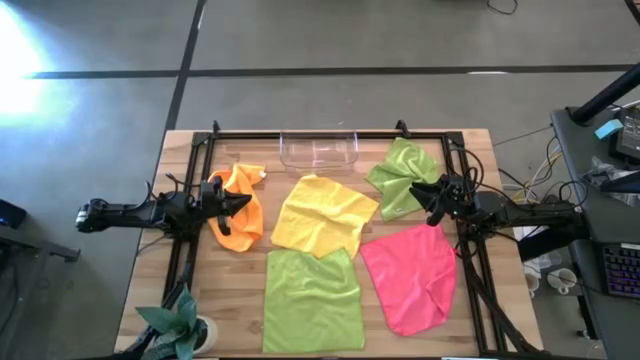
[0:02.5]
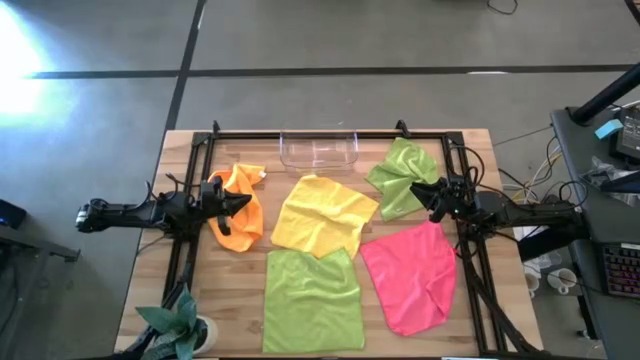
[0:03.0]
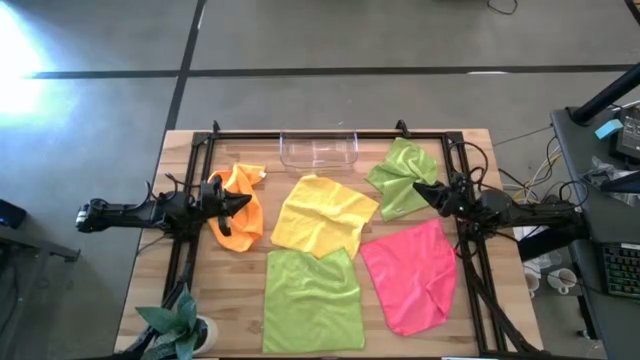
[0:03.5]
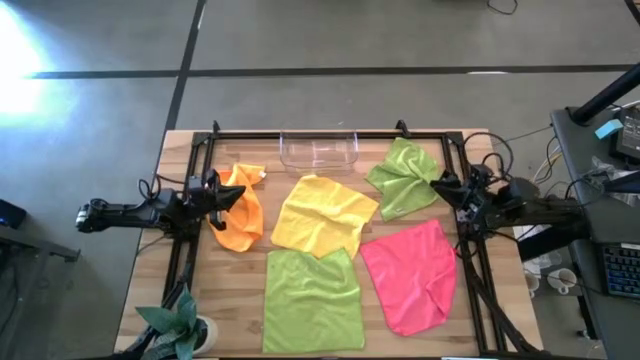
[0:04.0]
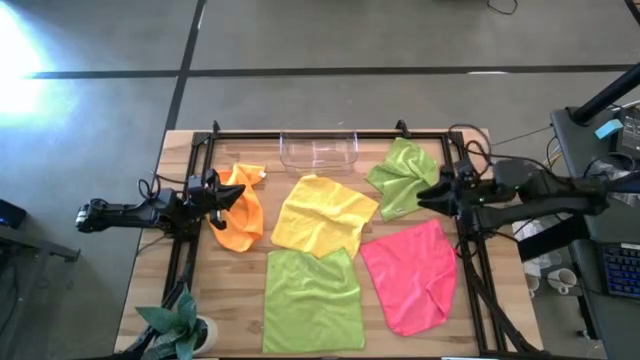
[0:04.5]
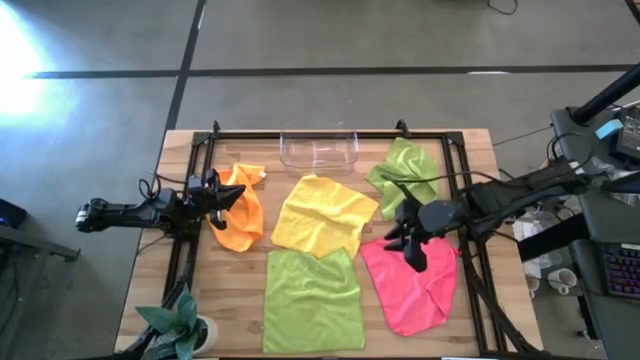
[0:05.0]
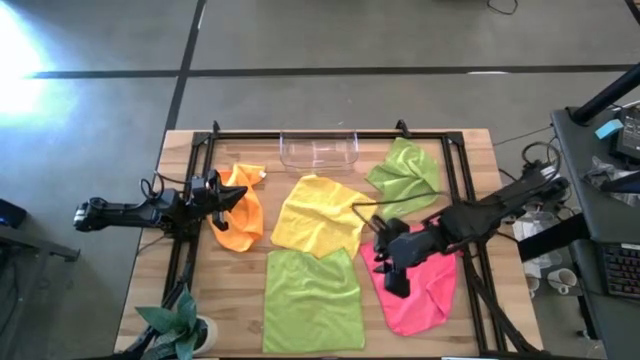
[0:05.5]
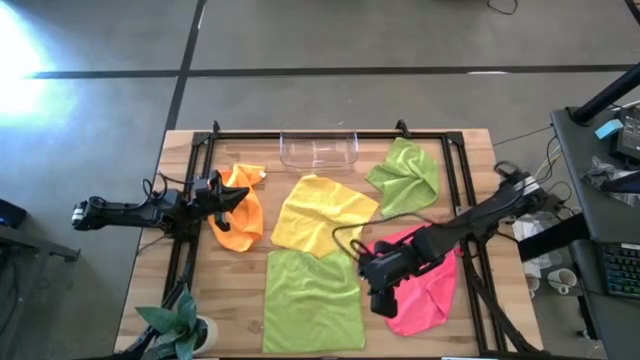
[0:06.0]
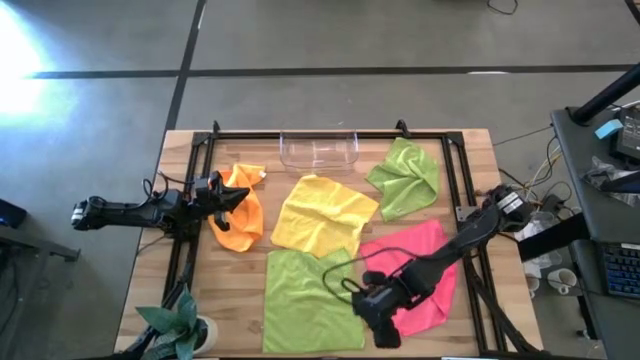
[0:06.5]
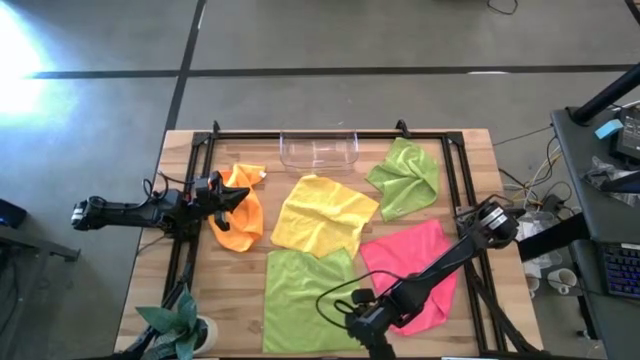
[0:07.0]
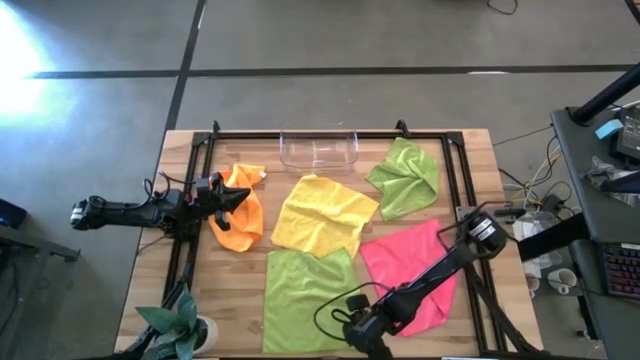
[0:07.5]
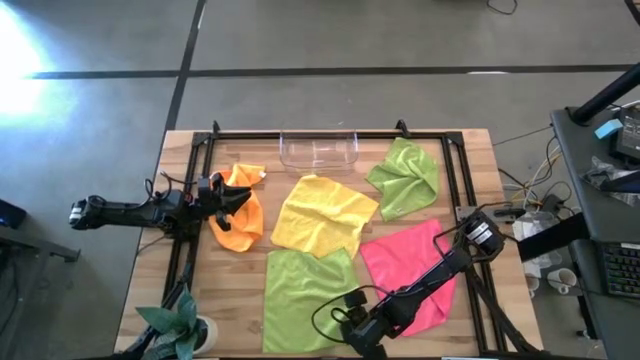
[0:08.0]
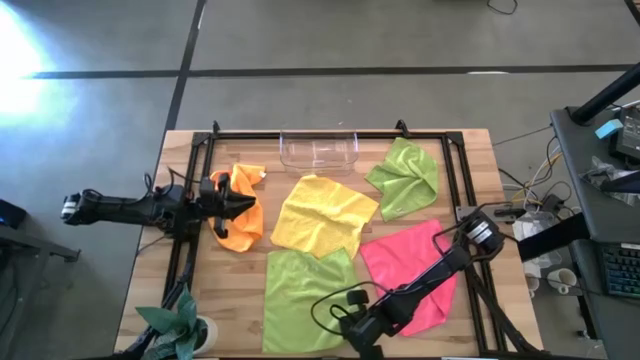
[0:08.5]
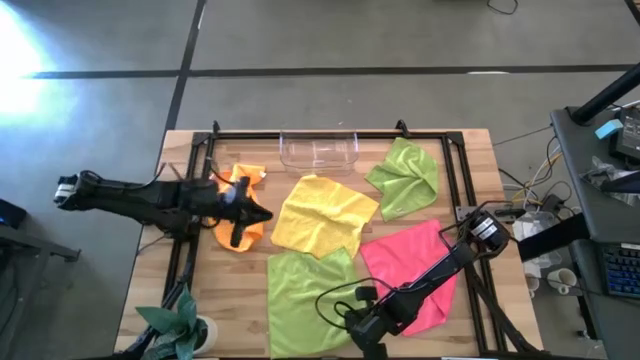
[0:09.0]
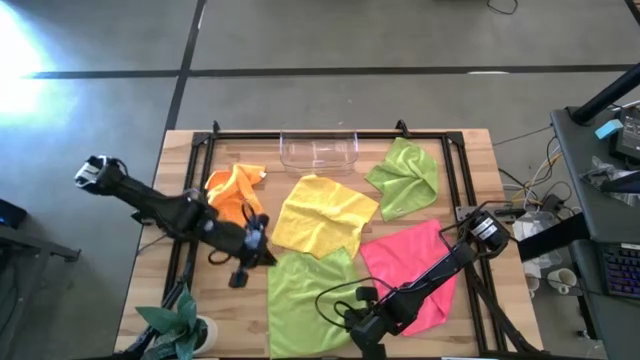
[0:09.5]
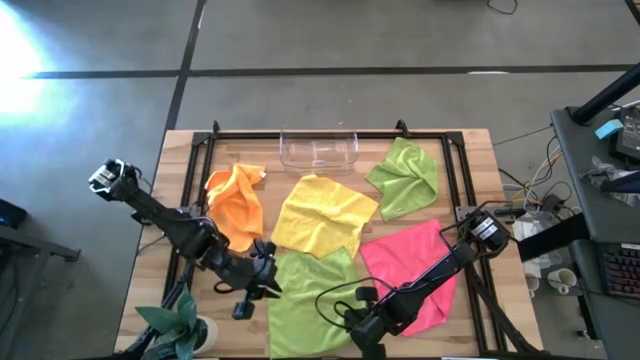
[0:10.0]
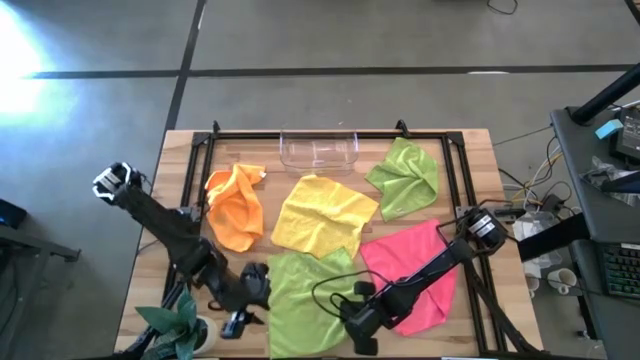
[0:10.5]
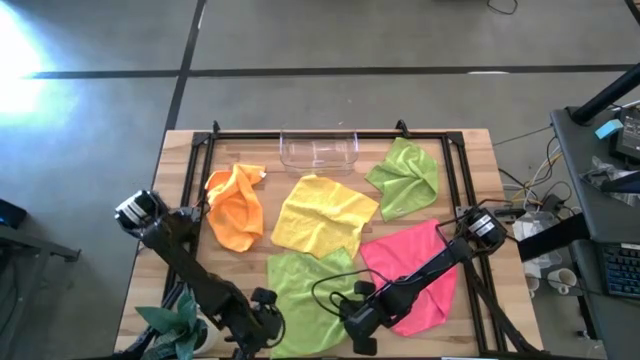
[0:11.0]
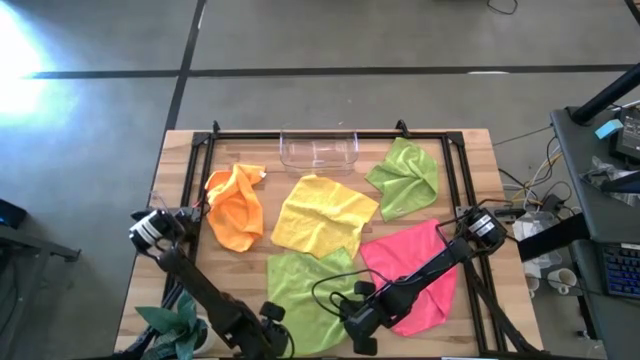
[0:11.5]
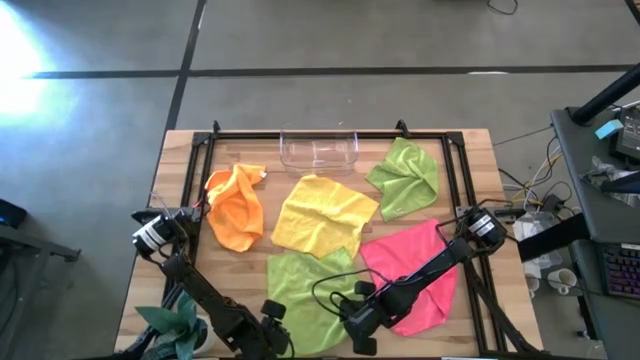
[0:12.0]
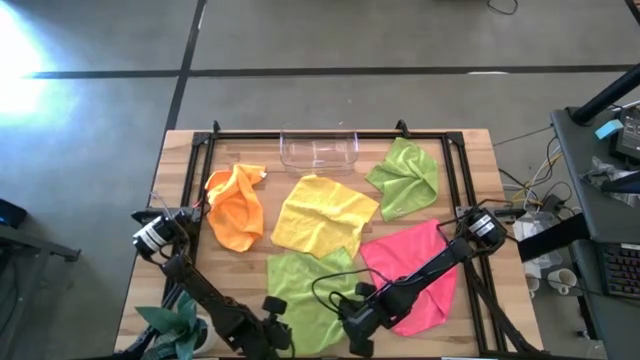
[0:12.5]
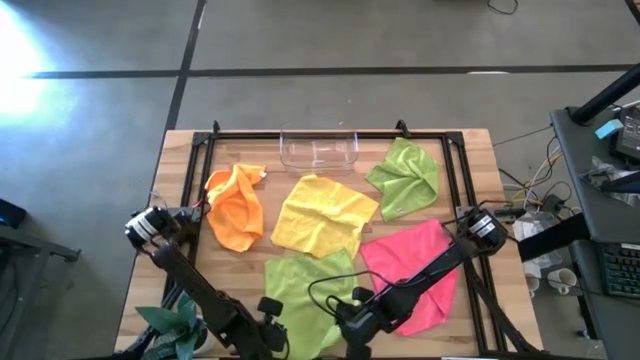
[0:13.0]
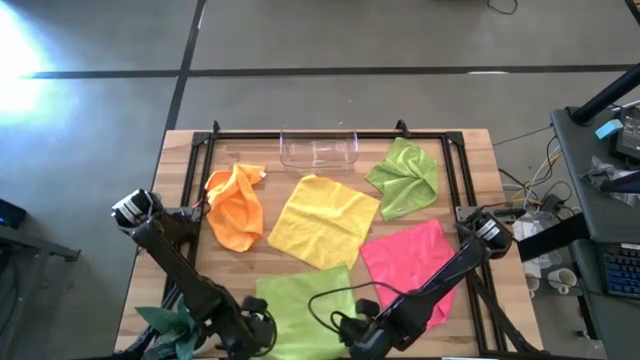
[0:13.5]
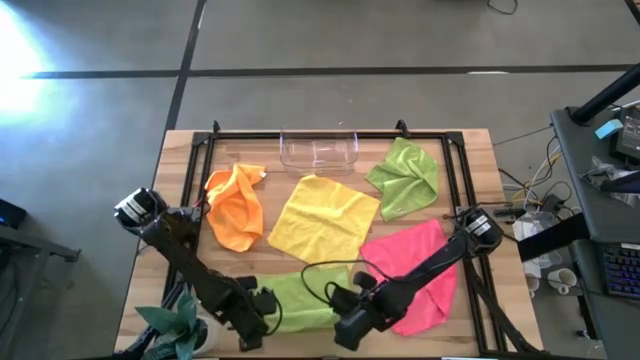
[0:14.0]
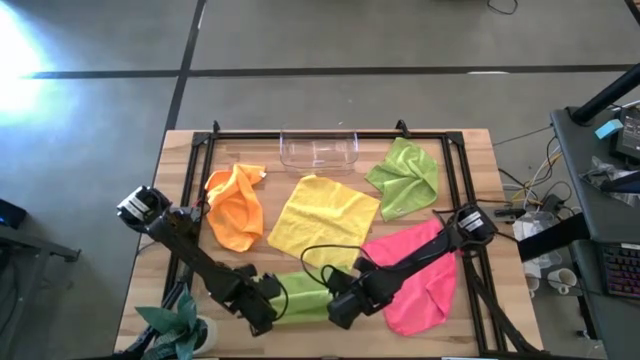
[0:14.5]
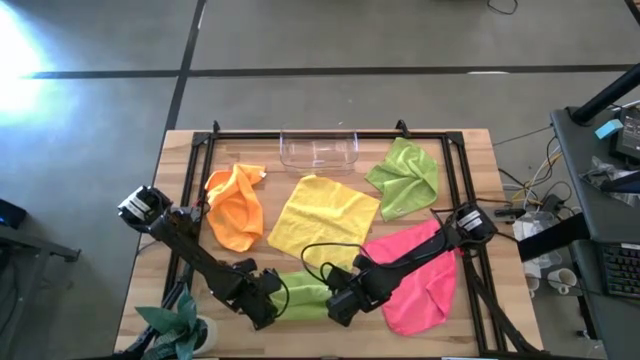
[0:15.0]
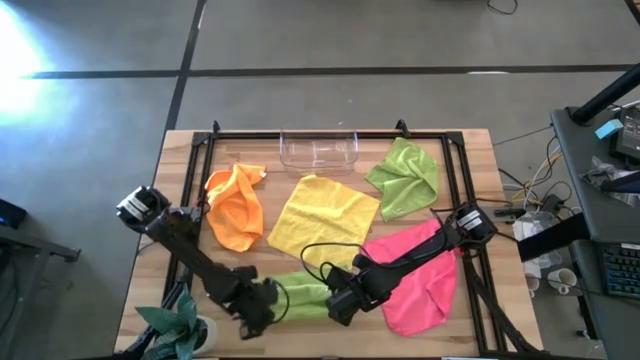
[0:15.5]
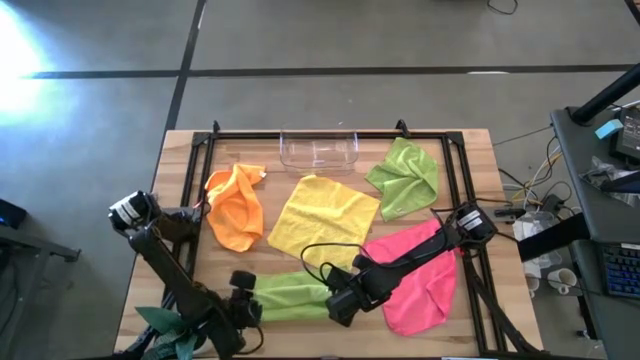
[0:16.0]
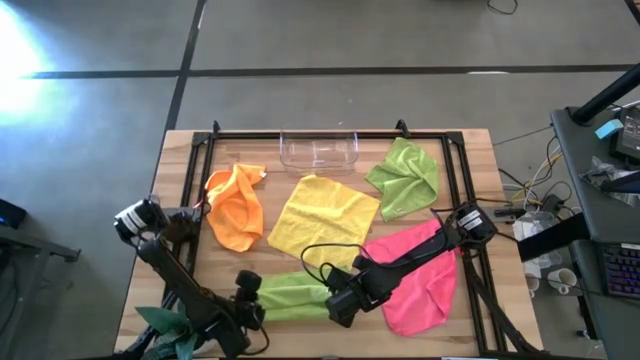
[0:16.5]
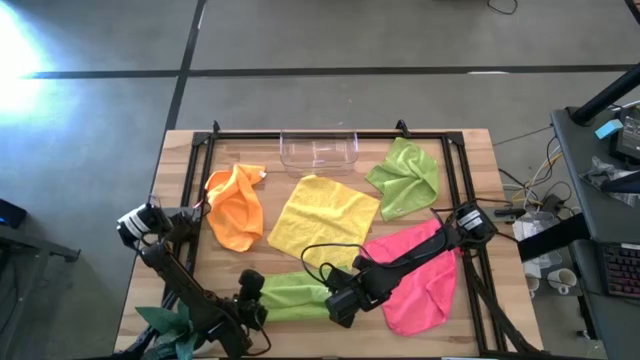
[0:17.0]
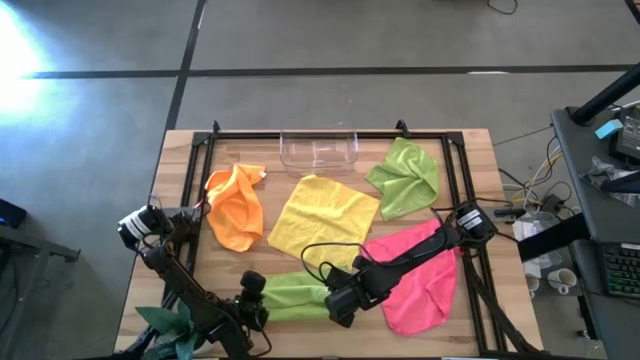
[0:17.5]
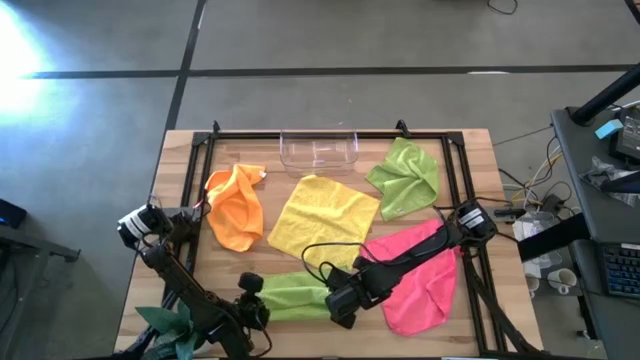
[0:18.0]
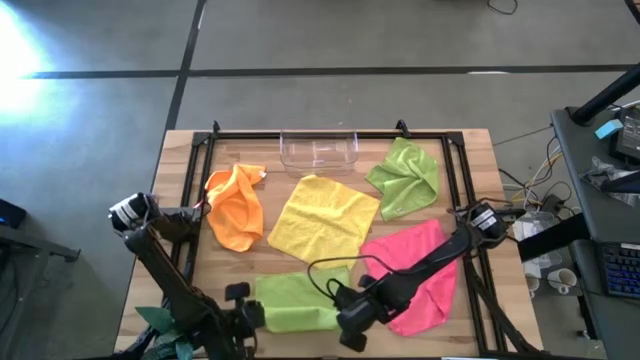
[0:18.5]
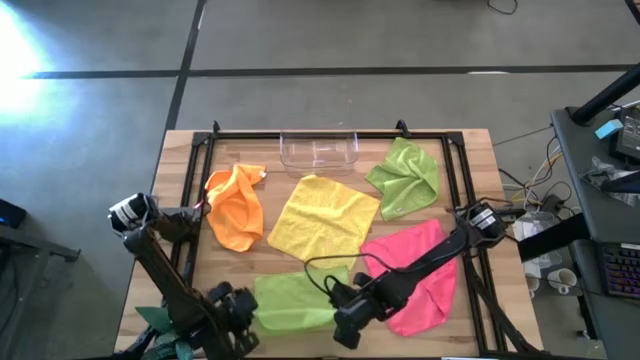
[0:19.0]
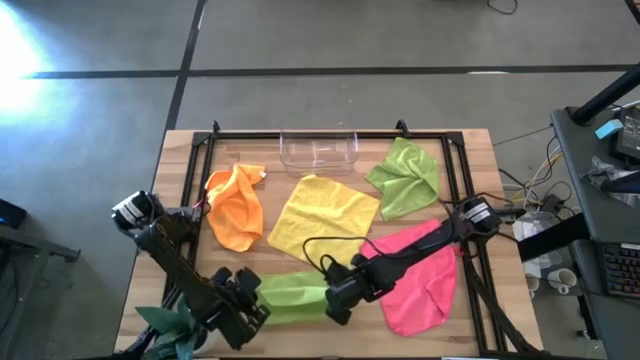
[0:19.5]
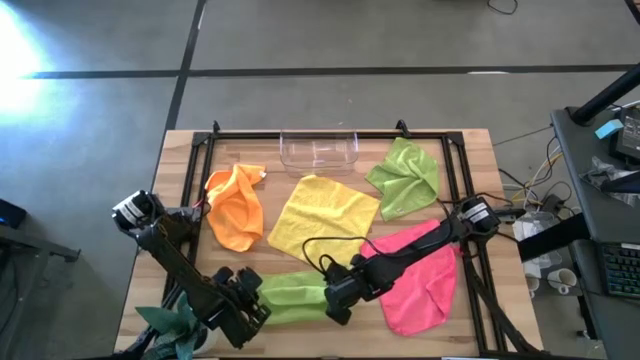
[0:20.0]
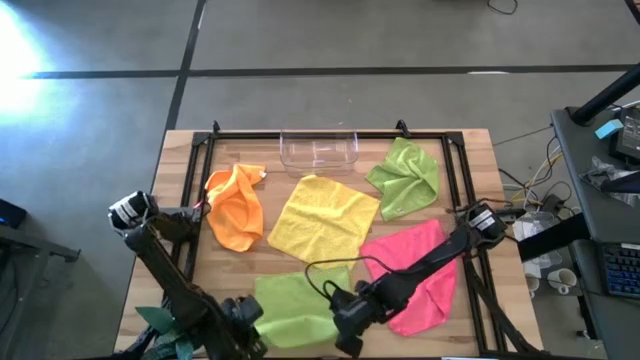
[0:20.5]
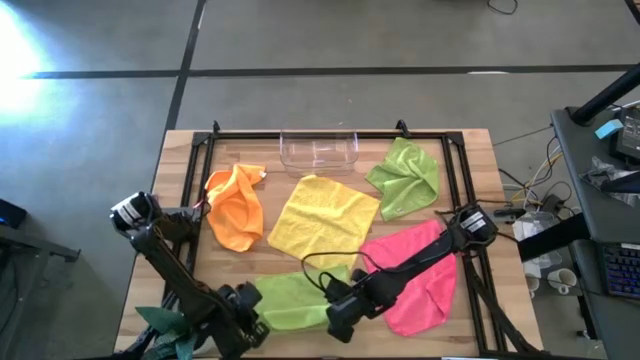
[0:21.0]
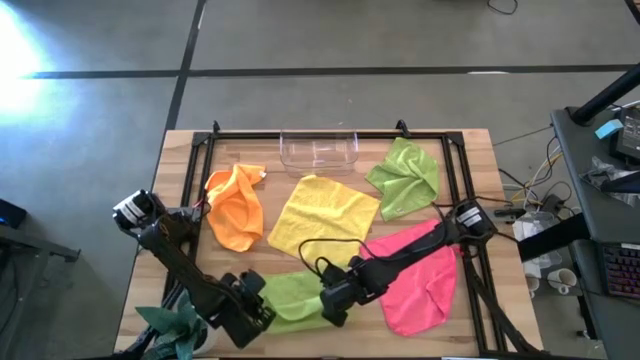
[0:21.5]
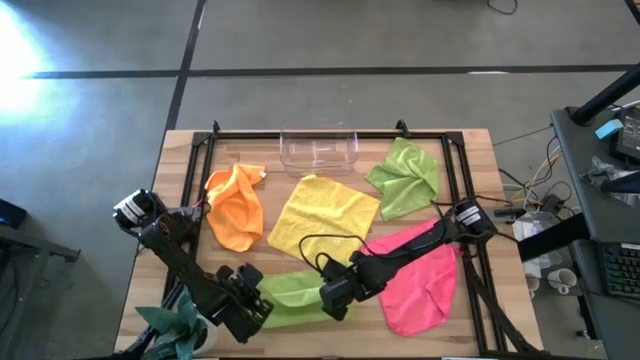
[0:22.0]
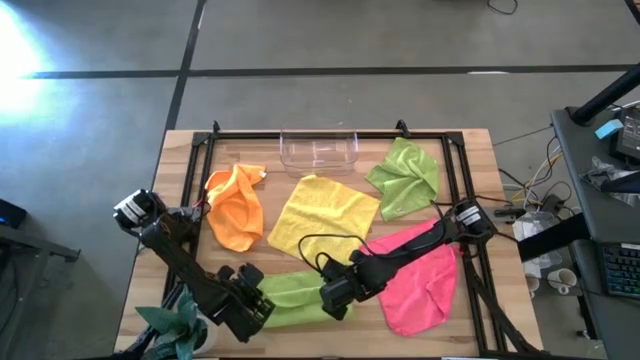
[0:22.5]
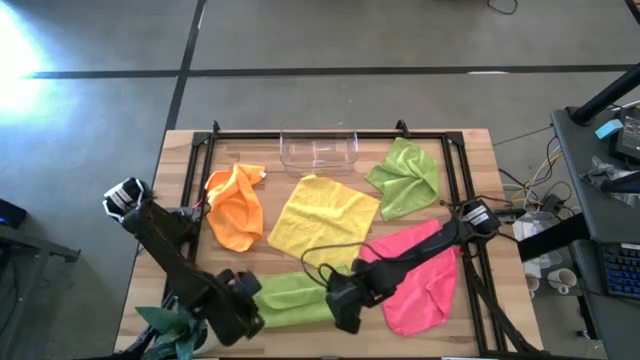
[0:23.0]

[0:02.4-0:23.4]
Task: Fold microfiber towels
Fold the bottom green microfiber cloth
